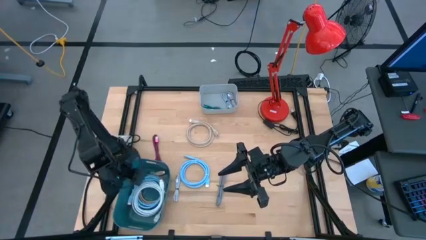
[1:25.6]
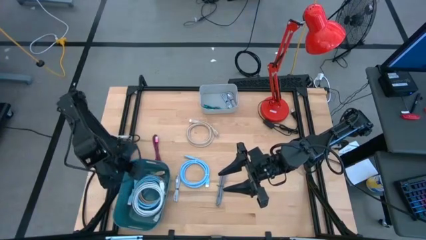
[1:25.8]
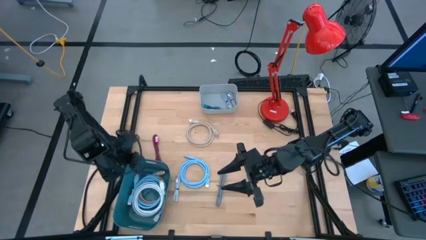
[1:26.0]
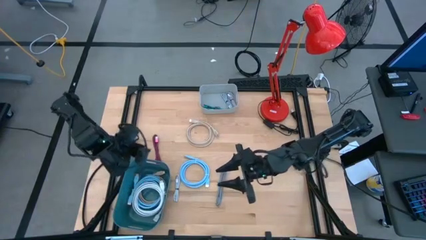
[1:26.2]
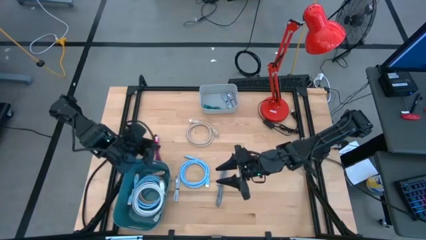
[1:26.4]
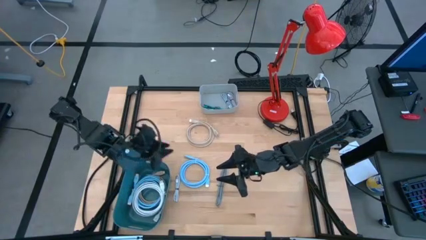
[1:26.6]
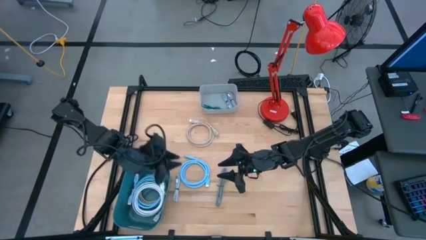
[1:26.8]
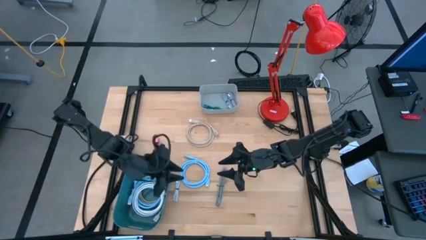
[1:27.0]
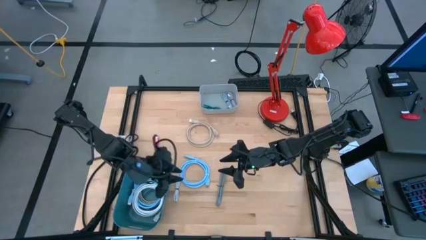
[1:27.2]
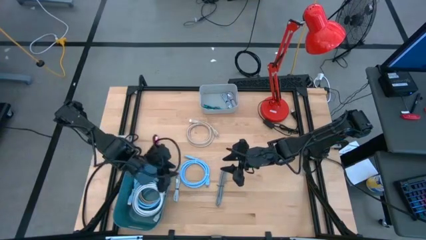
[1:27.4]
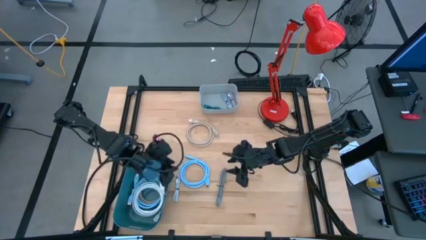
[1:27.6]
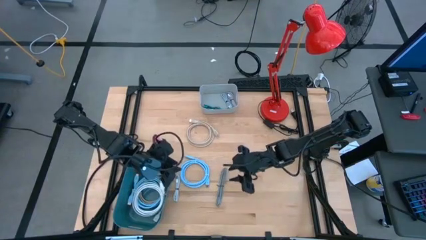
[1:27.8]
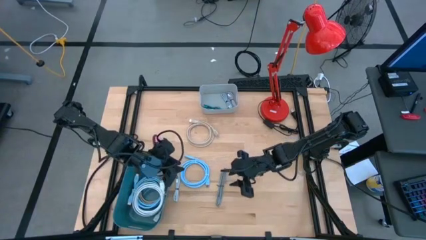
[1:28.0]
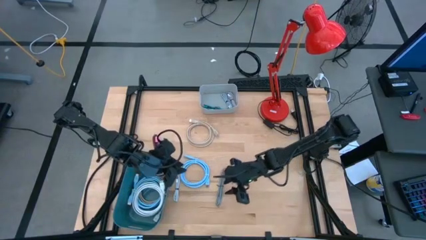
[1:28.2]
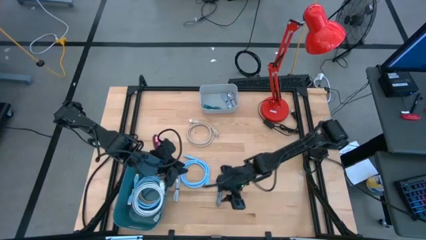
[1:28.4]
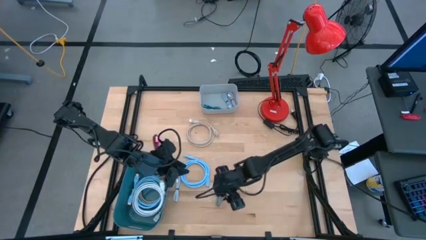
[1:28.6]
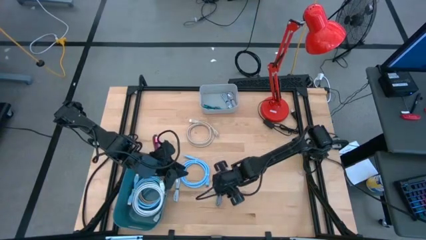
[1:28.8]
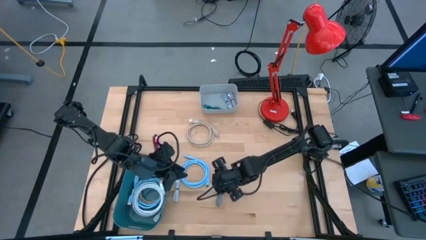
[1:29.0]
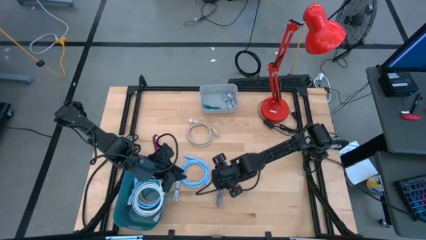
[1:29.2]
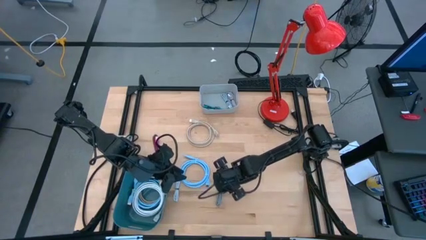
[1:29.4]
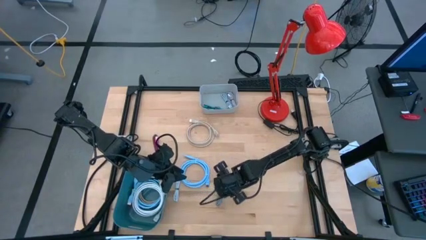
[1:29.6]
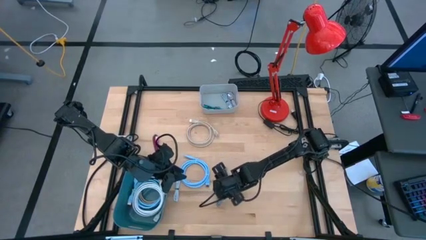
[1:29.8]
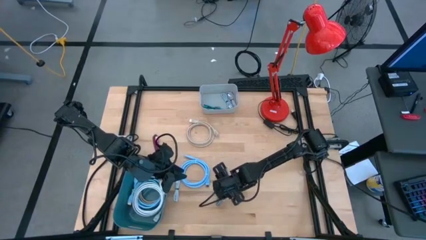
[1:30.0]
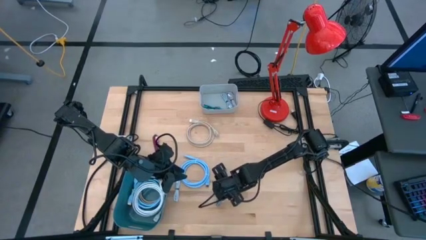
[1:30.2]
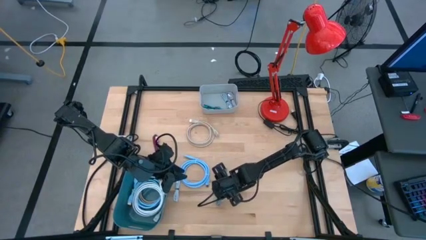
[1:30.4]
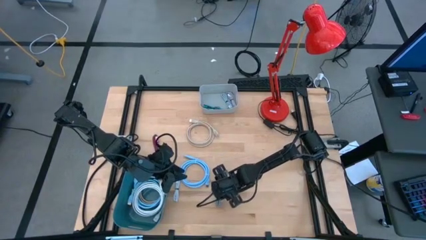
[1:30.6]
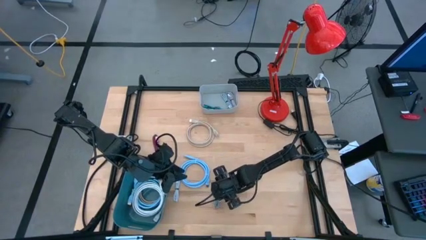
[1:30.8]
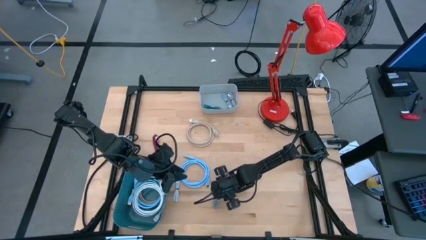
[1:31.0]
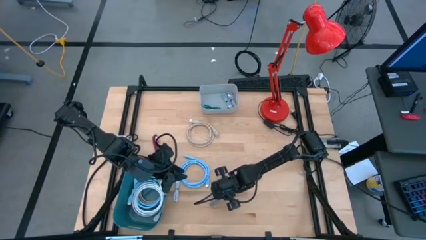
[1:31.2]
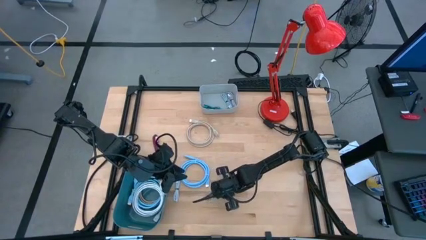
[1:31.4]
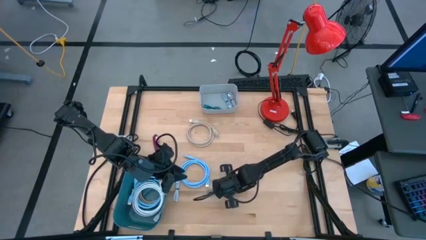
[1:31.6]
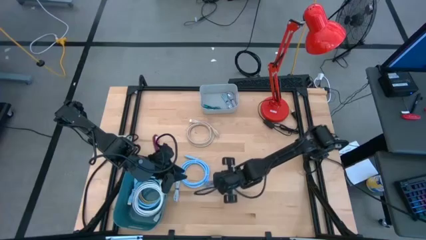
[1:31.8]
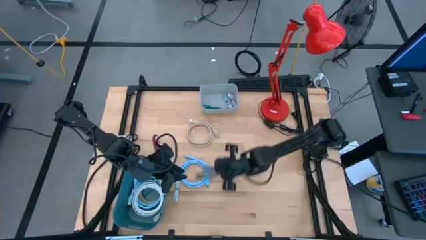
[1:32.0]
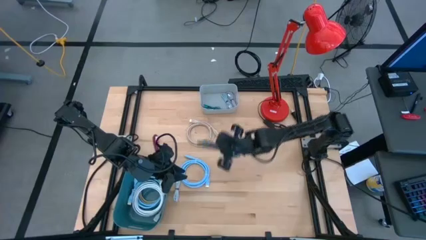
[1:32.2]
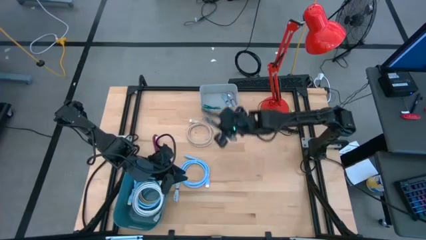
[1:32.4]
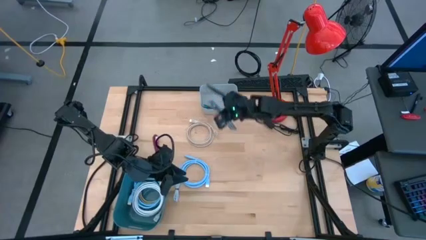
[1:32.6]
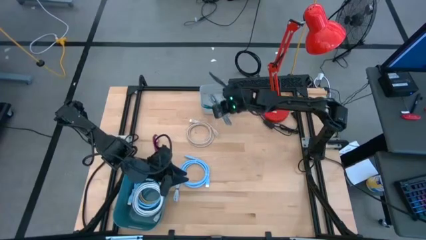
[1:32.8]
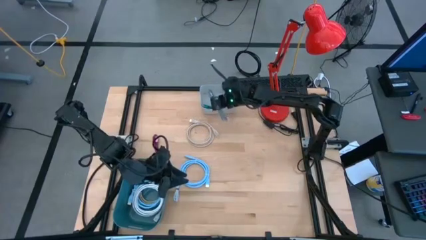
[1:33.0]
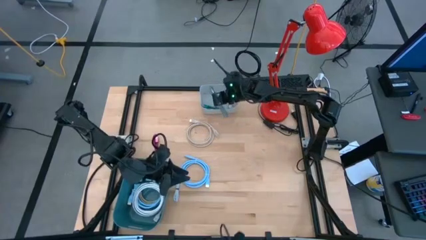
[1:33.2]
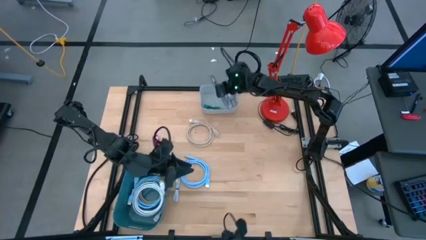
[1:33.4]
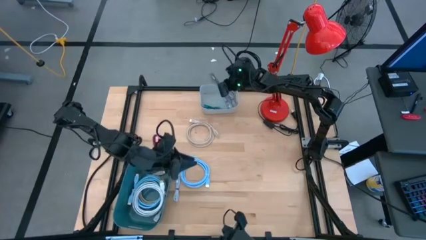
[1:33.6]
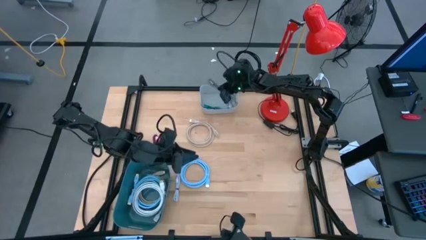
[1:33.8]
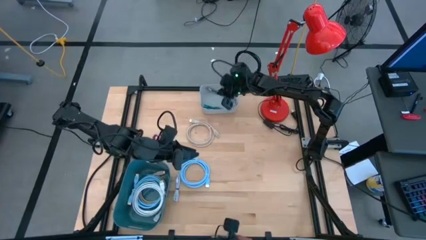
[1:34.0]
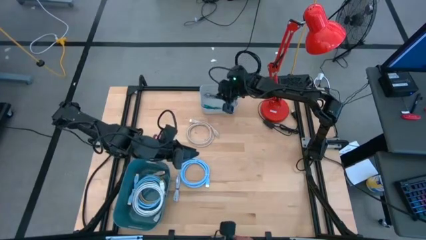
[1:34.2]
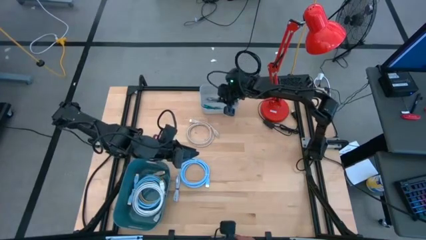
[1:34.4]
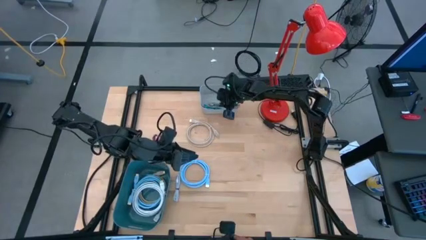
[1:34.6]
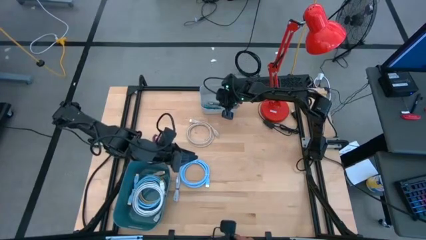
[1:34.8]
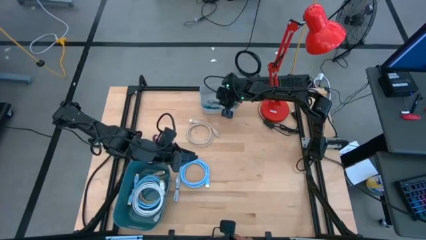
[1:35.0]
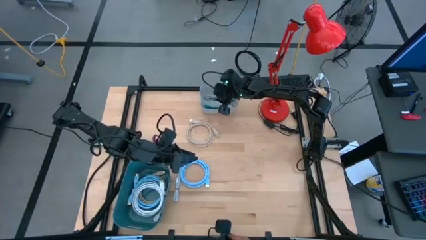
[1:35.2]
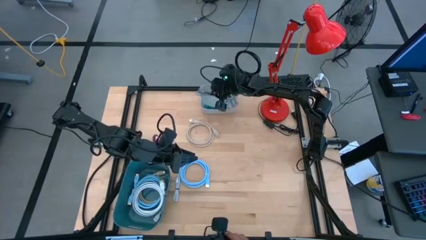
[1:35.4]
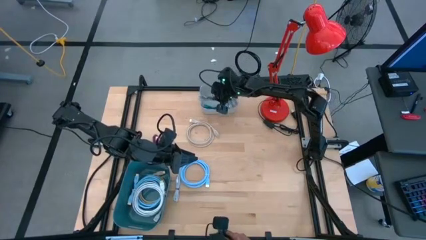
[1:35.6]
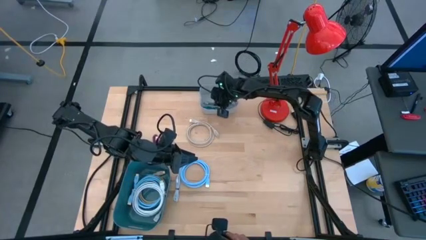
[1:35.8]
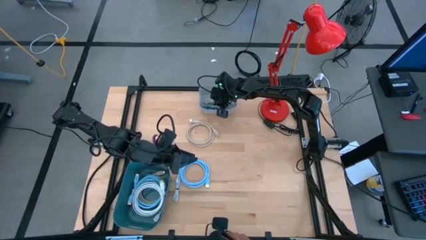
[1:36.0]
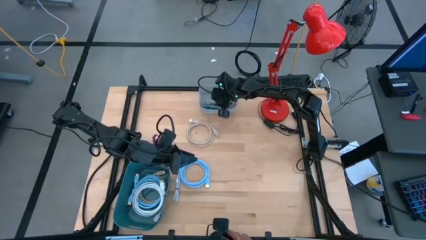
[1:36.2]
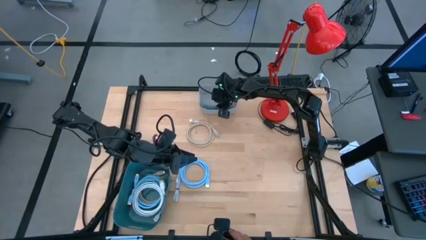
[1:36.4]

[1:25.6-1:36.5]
Task: Pick & Place USB Port
Put the black white charger cable into the gray bin

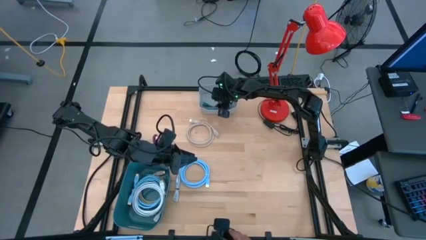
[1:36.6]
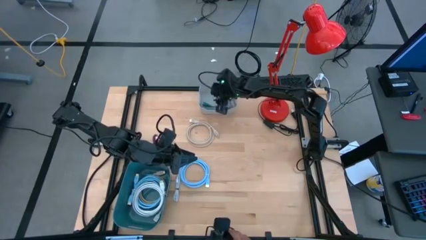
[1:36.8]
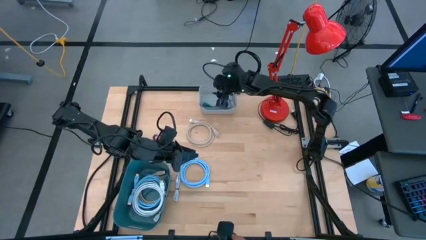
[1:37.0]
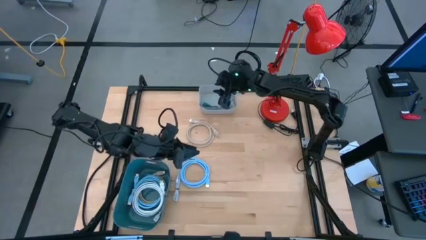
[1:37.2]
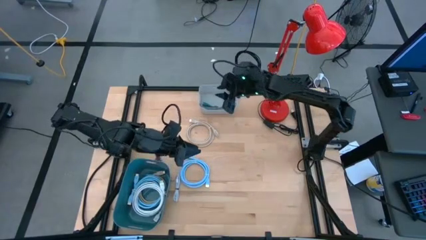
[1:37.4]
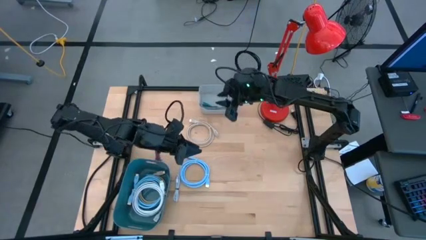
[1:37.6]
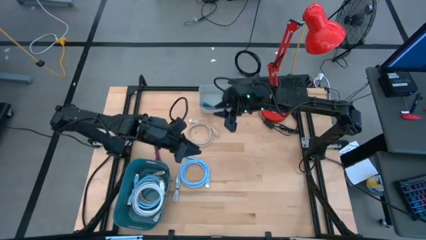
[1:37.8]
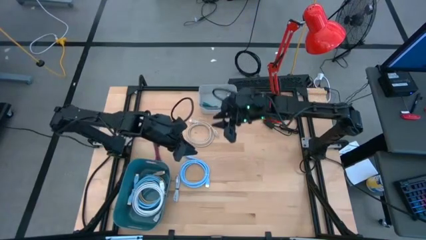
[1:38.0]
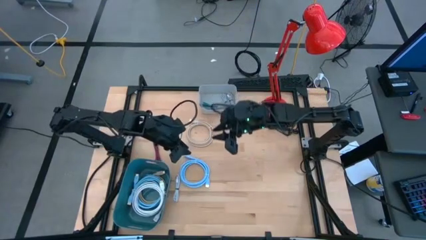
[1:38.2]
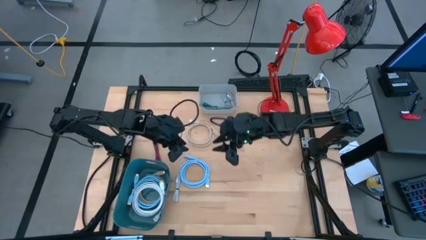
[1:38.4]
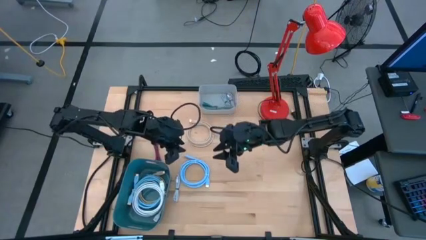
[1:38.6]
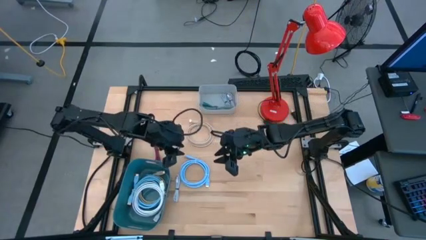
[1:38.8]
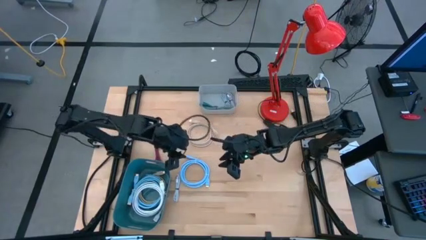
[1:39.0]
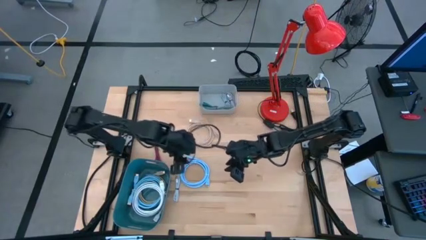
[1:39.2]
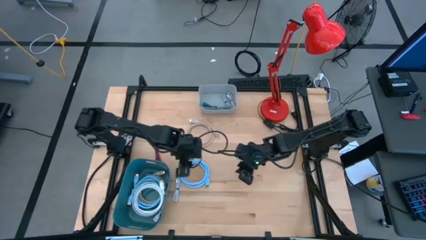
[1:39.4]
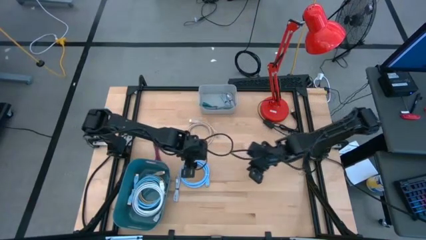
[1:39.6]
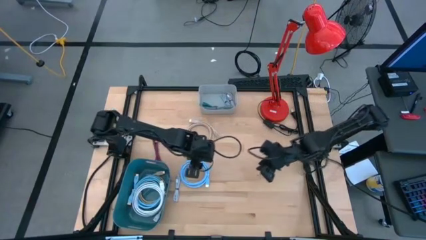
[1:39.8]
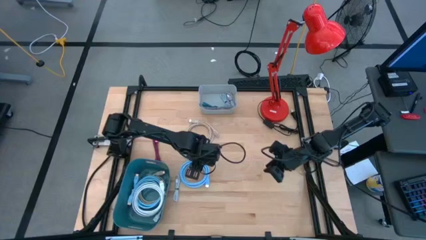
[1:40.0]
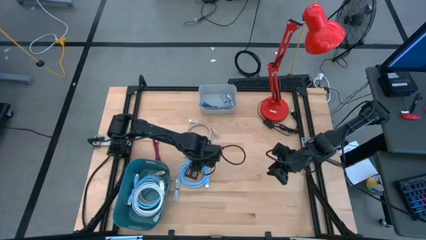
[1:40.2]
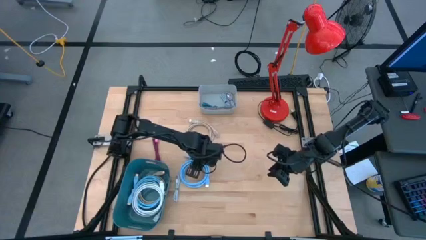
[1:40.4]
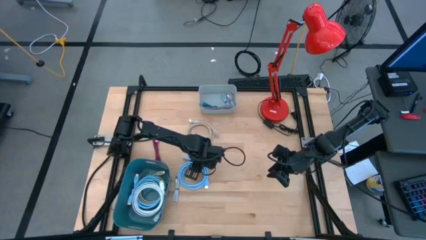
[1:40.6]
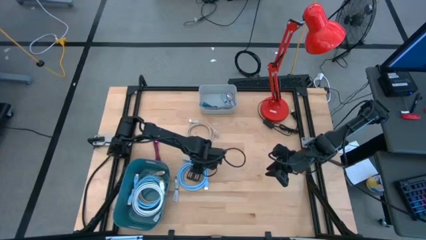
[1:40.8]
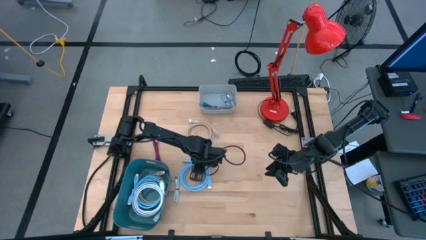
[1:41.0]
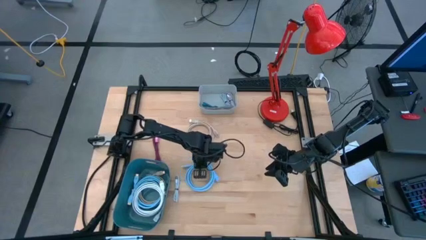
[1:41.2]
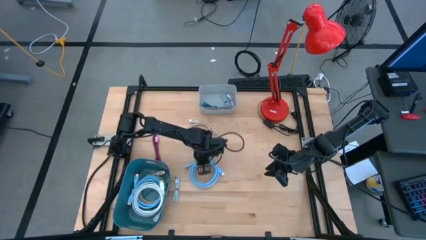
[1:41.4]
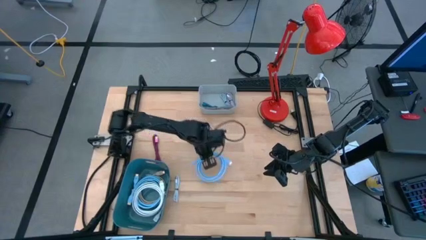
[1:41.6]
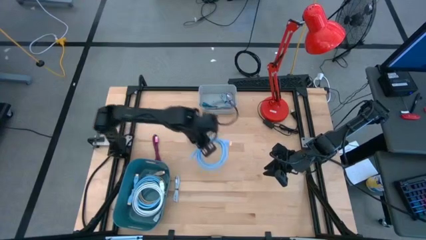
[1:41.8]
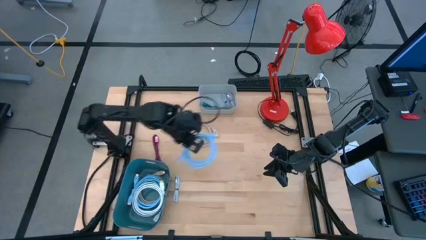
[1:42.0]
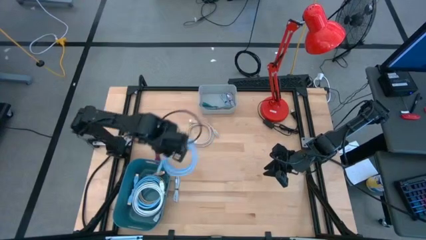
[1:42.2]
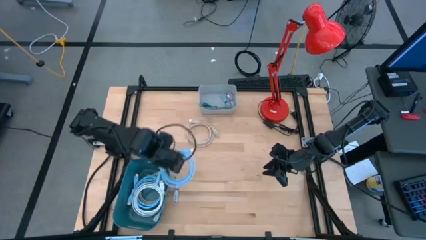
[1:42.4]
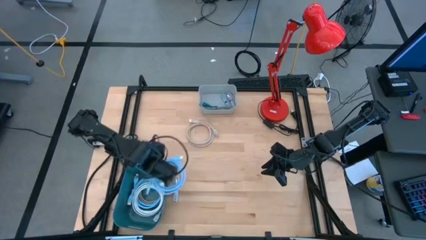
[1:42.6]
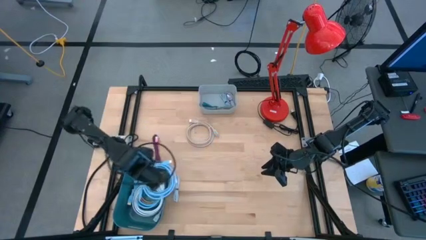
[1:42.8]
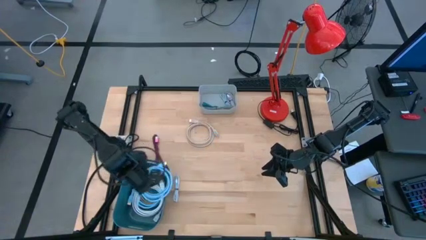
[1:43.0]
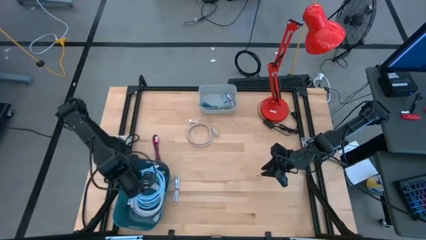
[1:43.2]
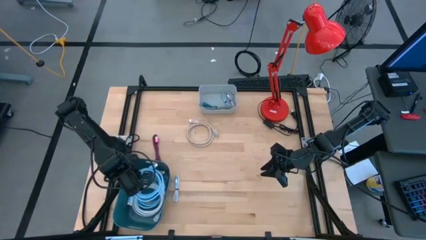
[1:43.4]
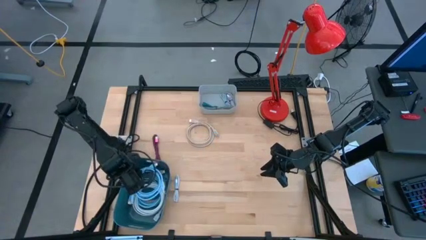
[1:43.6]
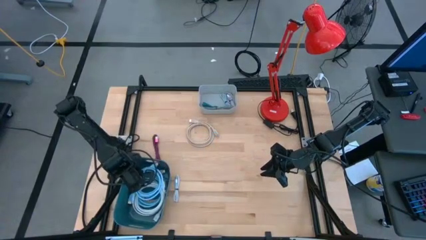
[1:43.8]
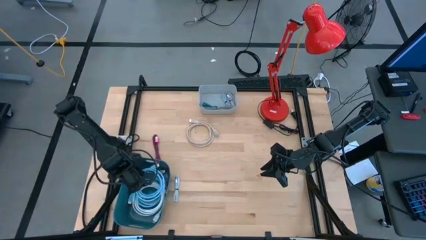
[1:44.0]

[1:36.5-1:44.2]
Put the blue HDMI cable into the blue bin
